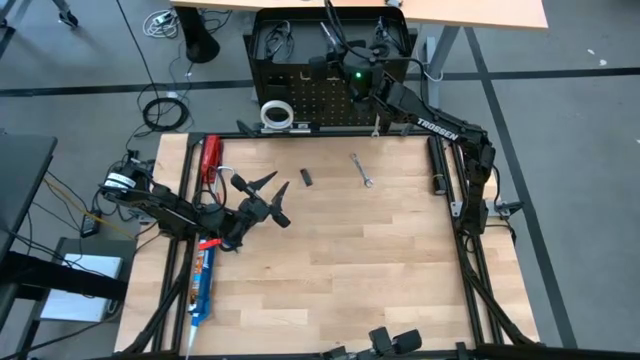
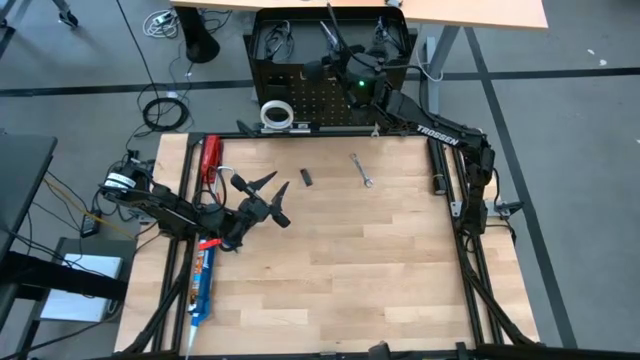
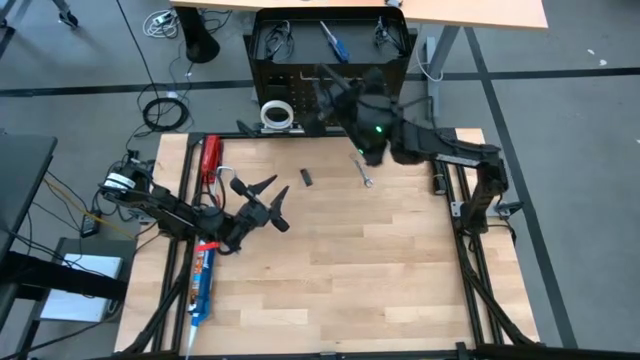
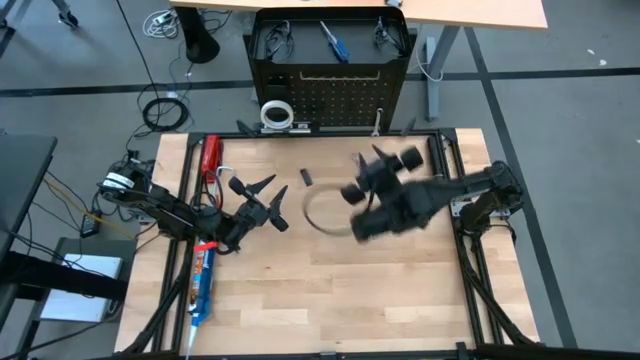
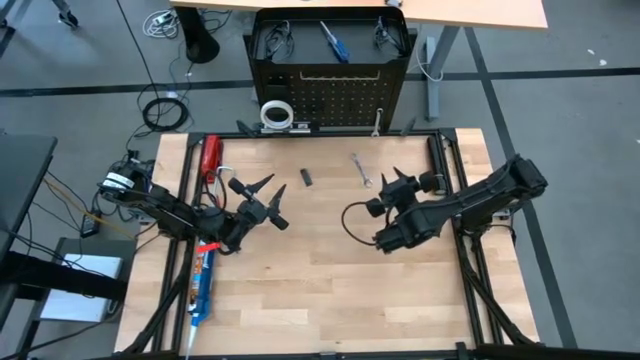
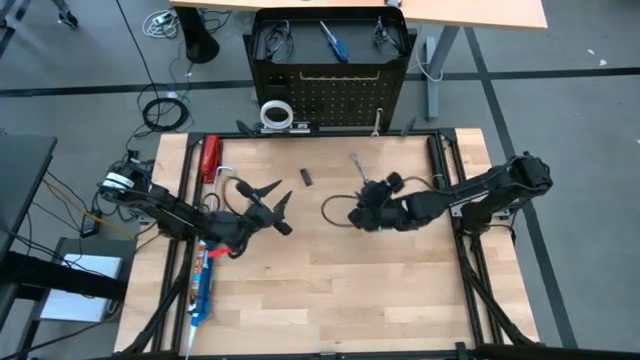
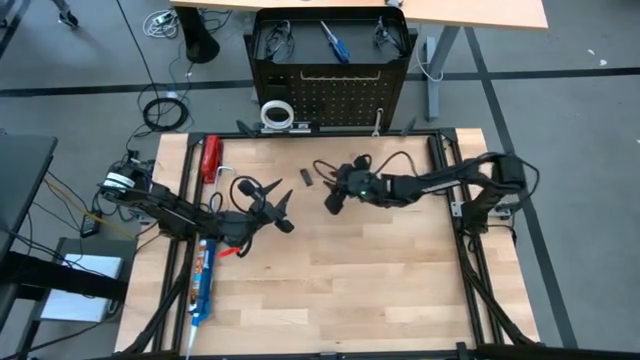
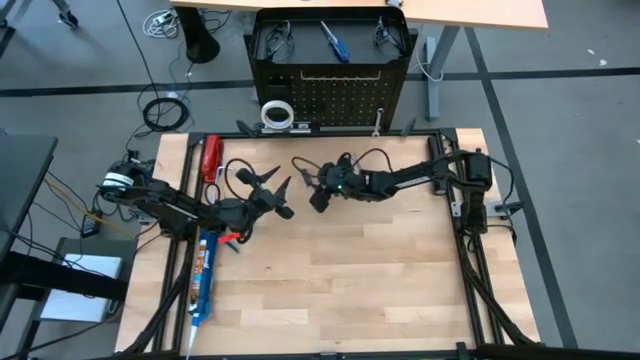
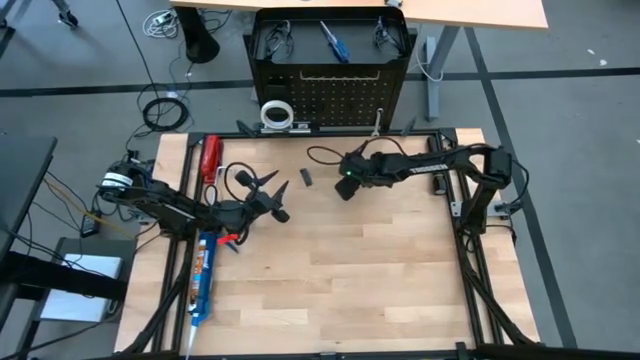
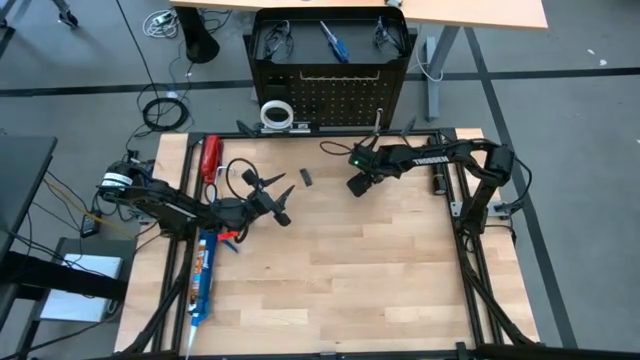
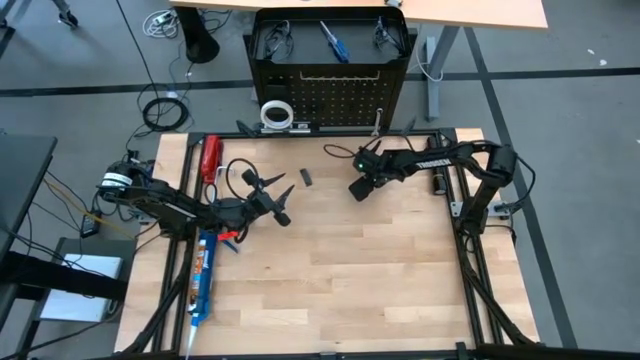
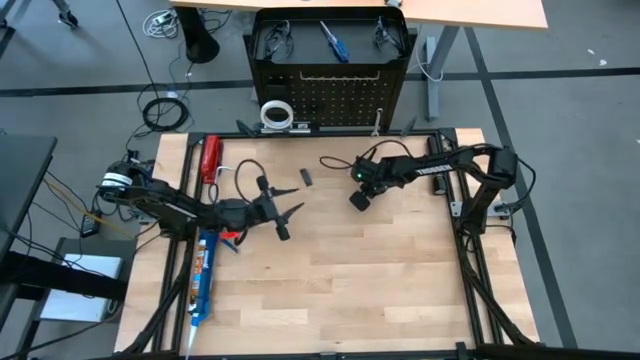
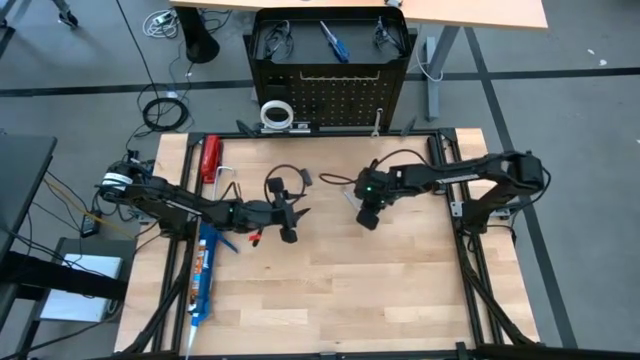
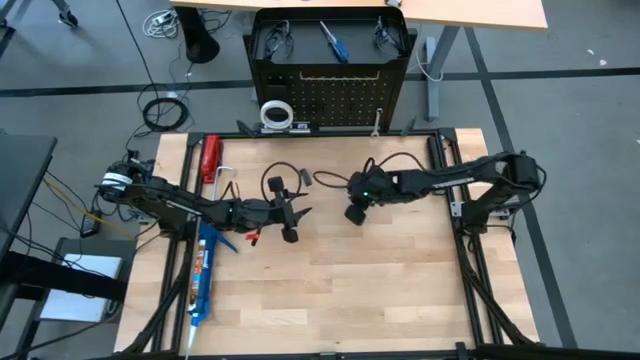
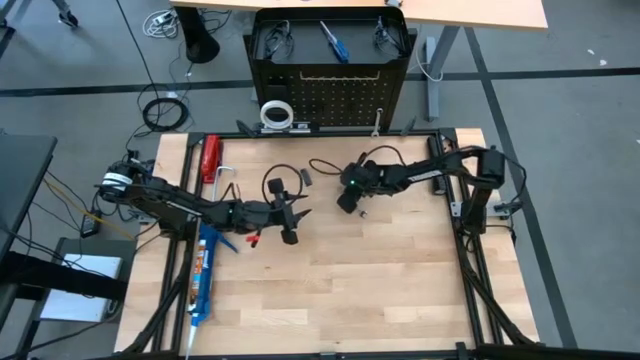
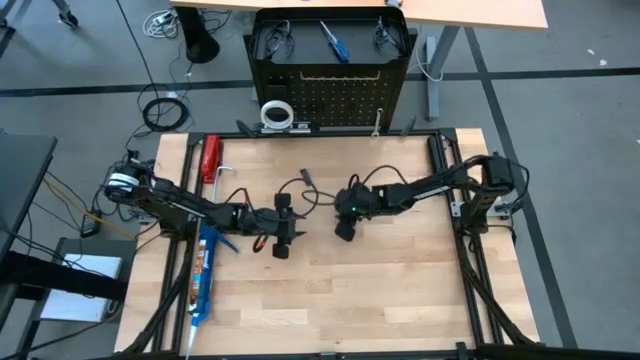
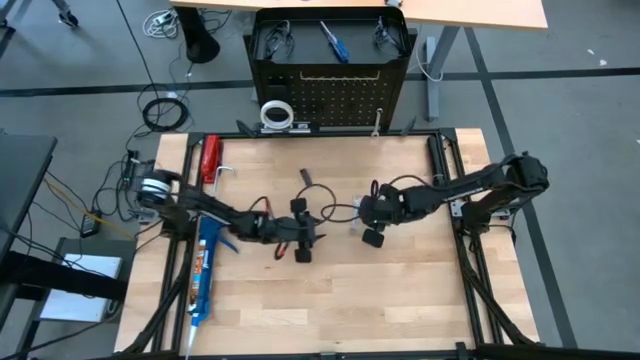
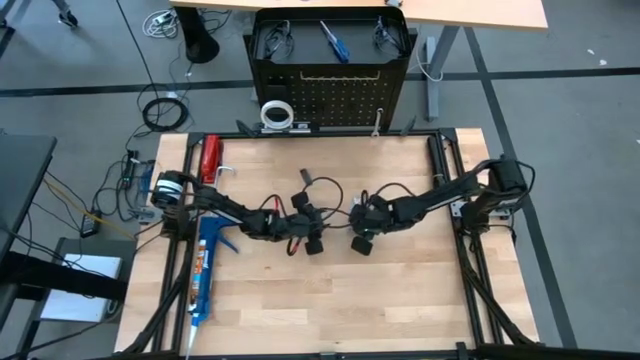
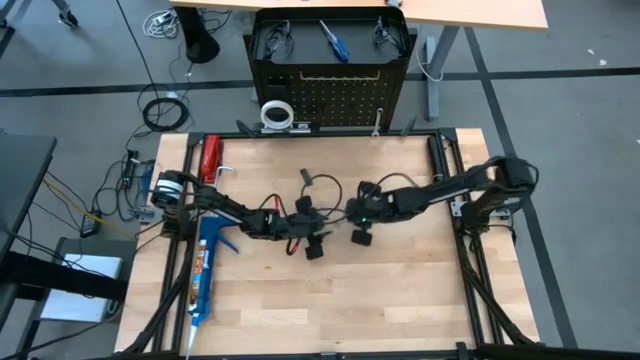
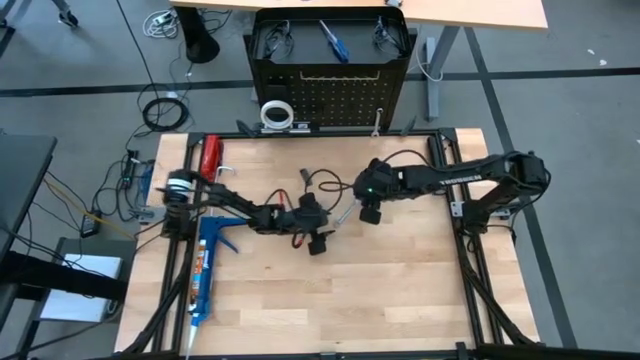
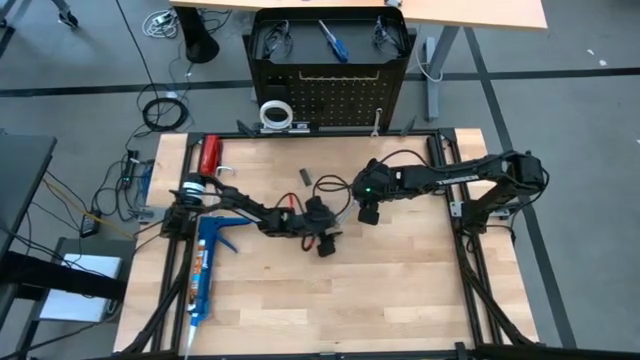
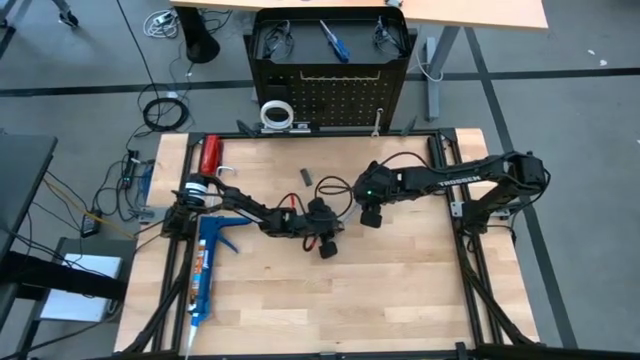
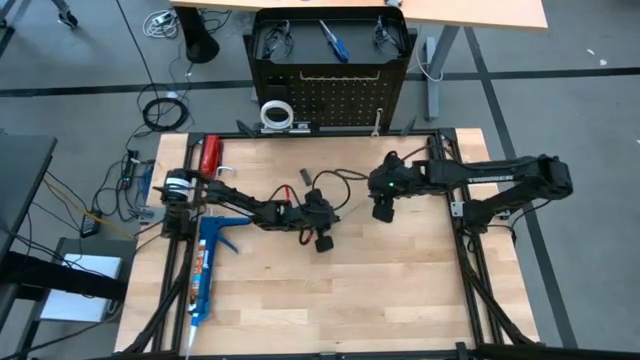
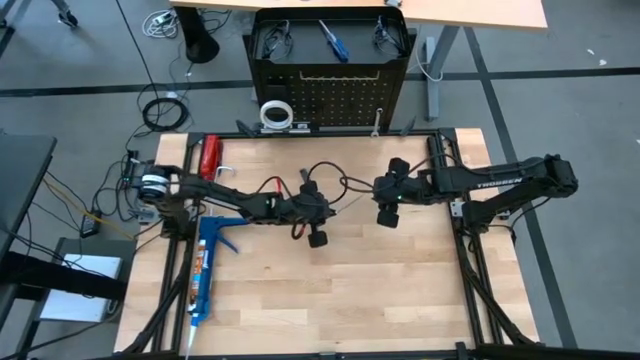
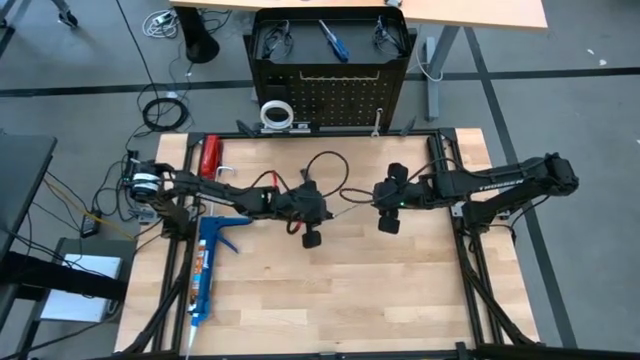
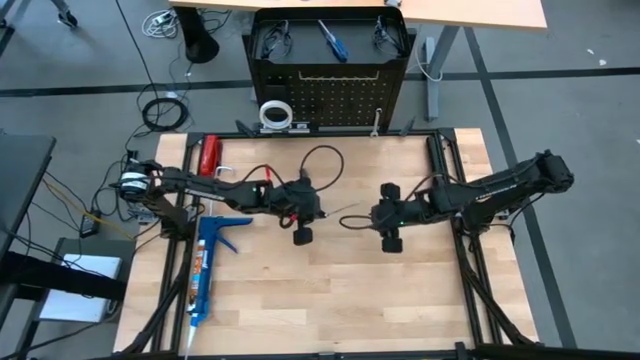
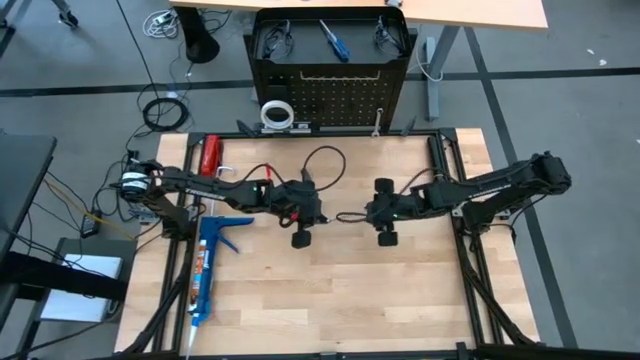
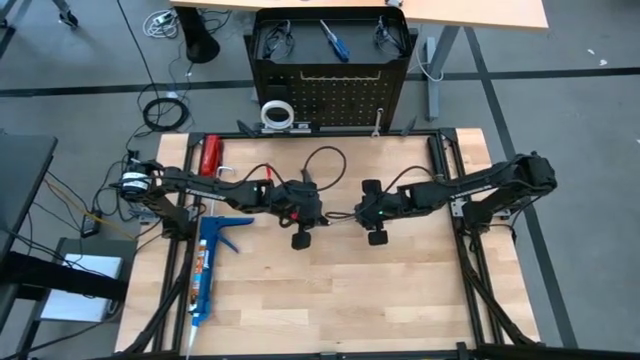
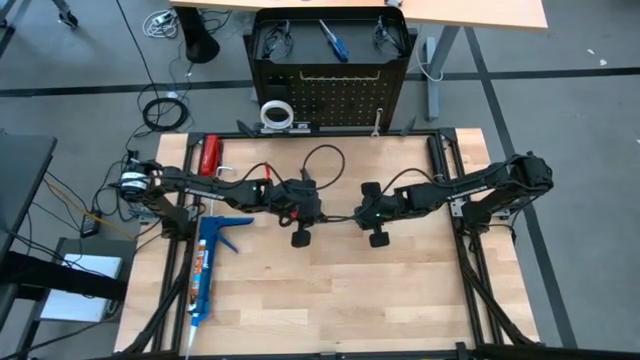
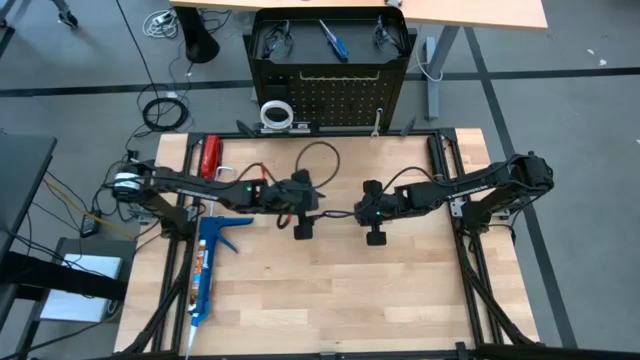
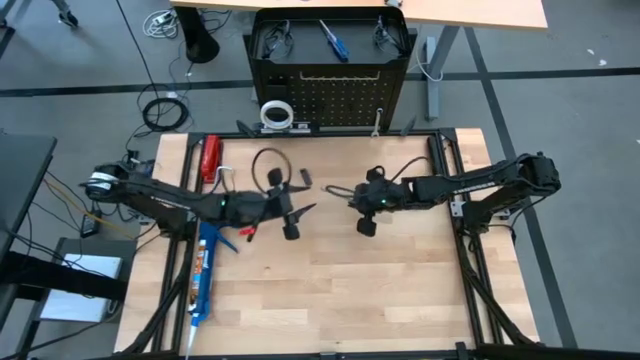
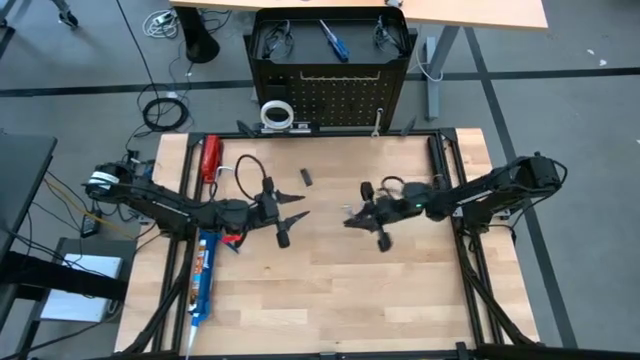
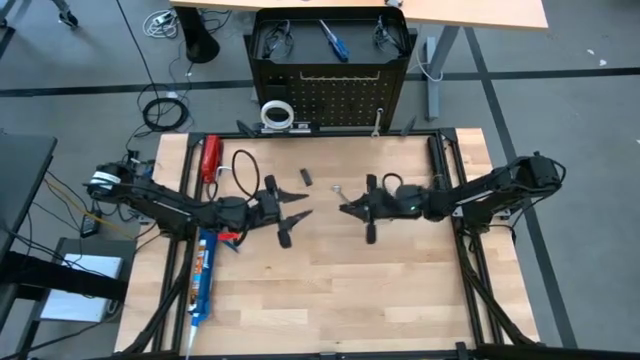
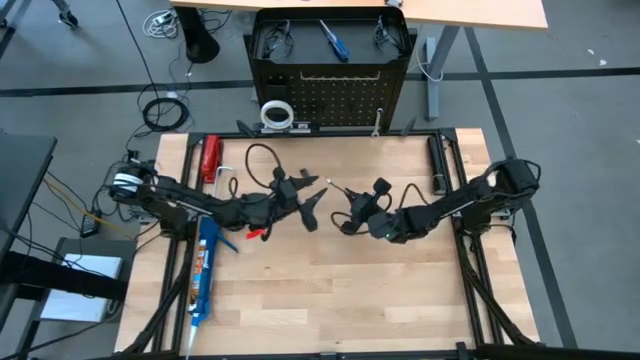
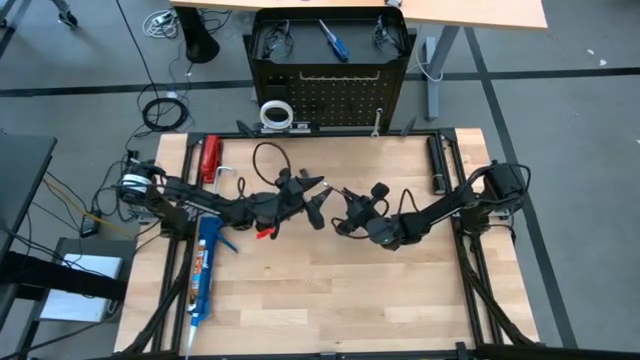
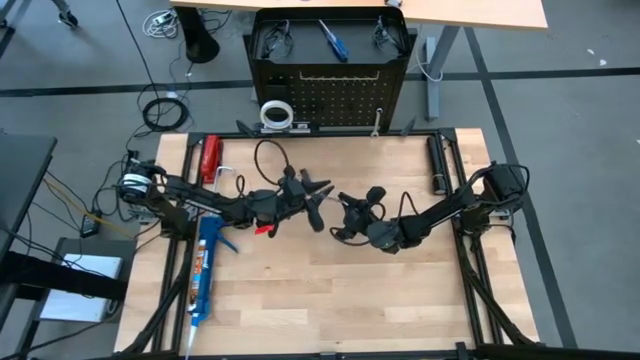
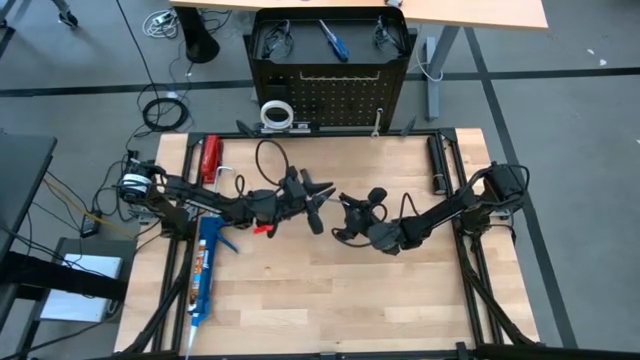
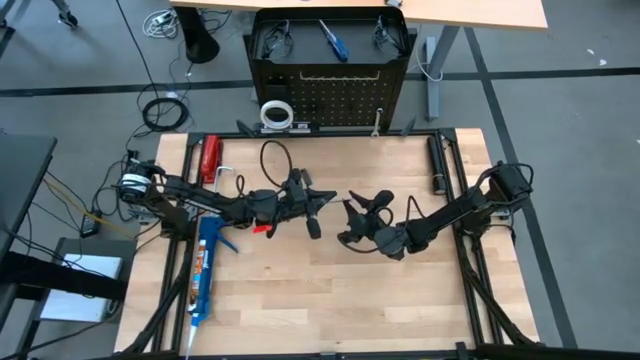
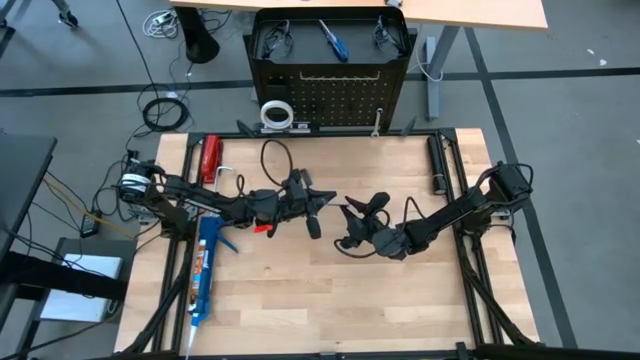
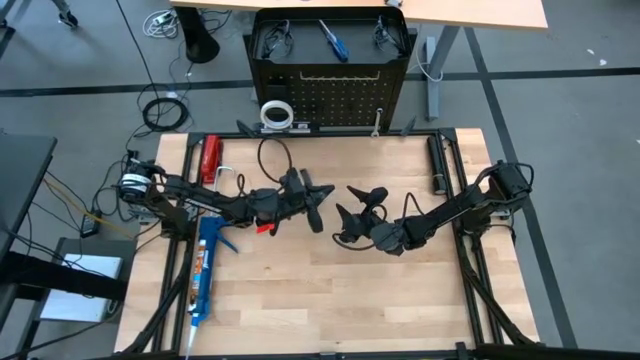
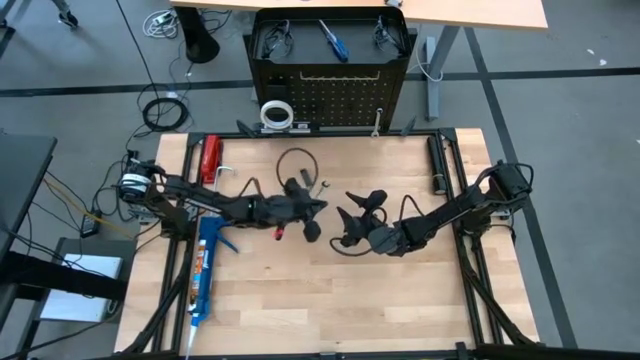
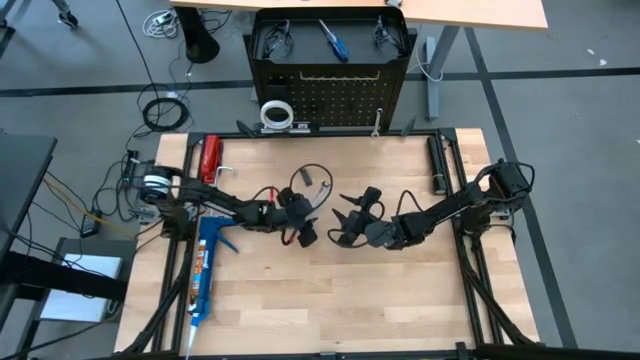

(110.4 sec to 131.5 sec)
Task: Hang tools onto peg board
Hang the wrench onto the black pegboard
